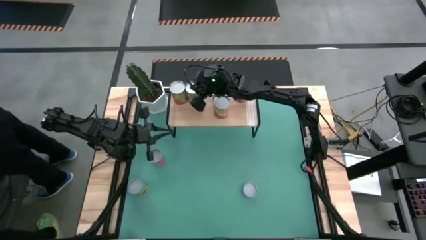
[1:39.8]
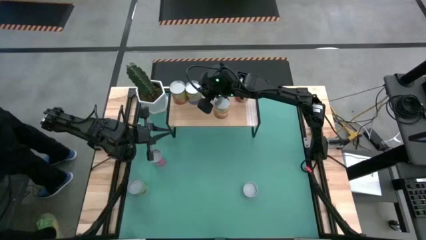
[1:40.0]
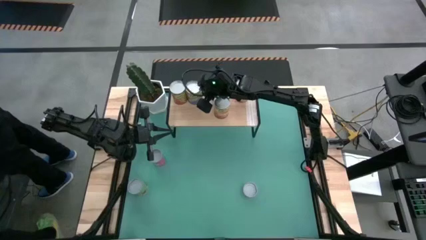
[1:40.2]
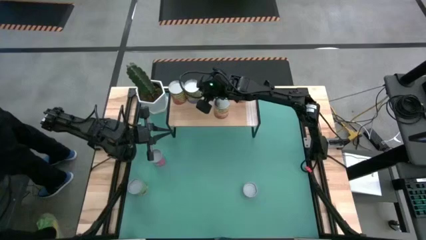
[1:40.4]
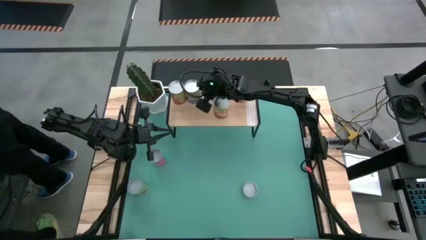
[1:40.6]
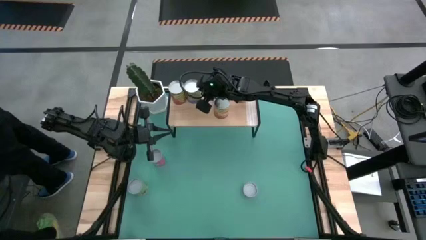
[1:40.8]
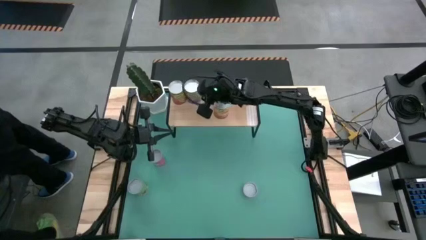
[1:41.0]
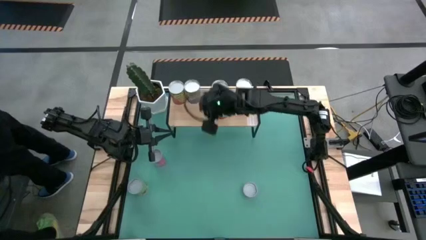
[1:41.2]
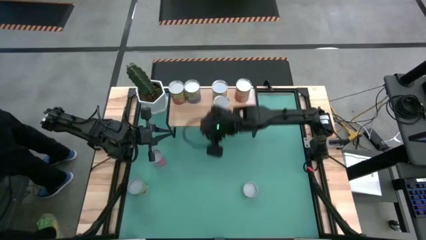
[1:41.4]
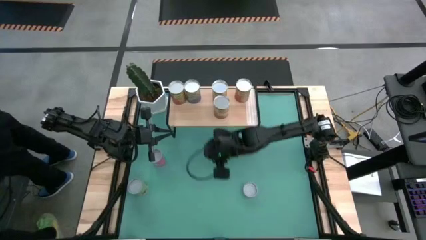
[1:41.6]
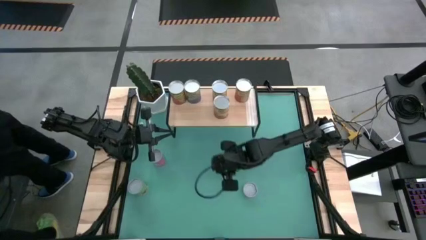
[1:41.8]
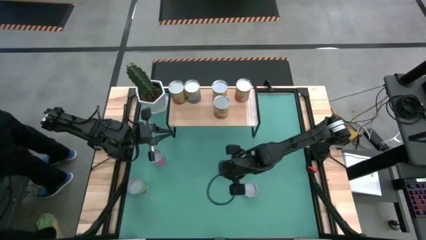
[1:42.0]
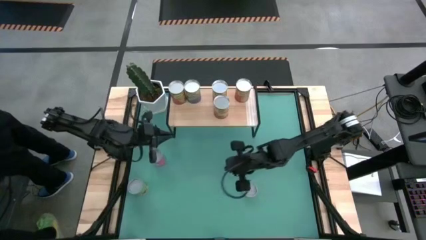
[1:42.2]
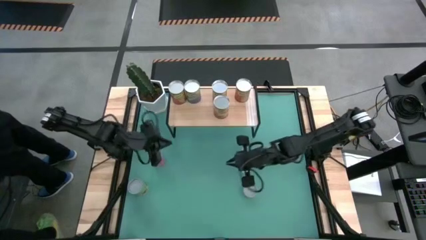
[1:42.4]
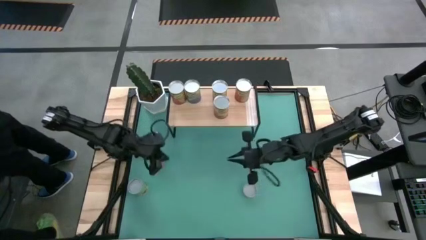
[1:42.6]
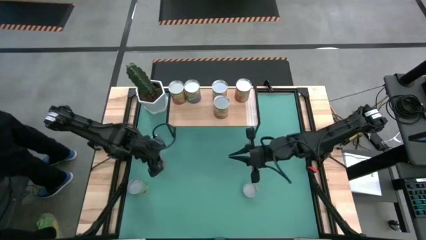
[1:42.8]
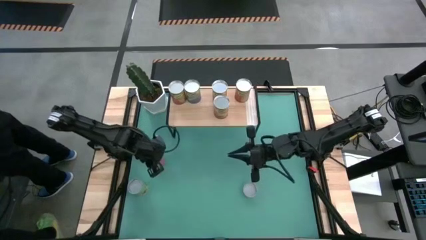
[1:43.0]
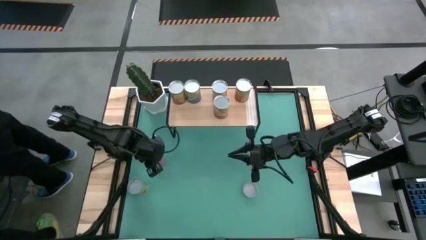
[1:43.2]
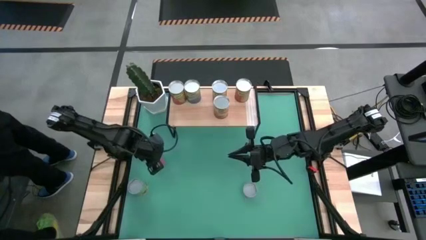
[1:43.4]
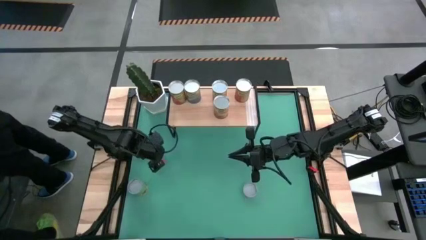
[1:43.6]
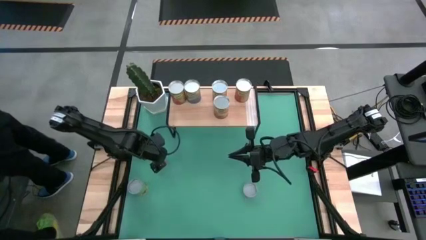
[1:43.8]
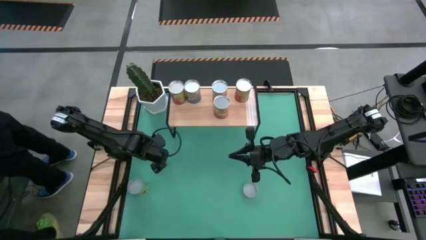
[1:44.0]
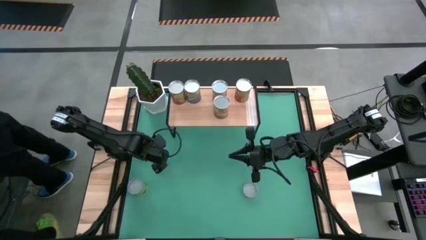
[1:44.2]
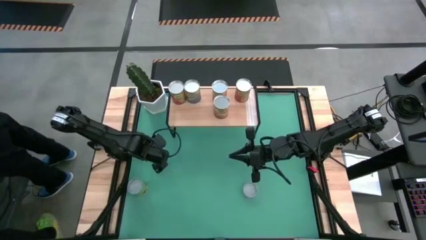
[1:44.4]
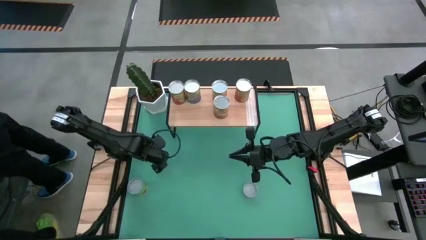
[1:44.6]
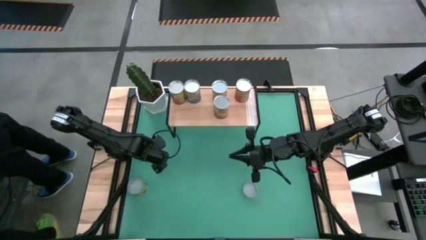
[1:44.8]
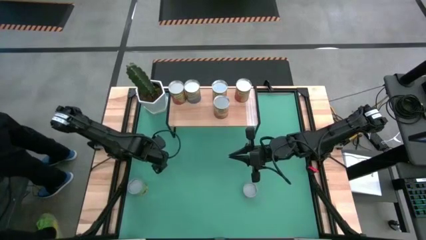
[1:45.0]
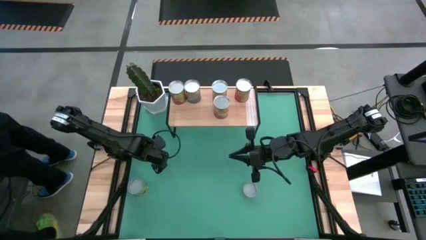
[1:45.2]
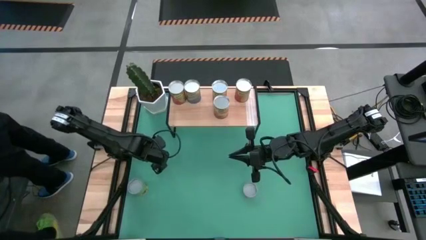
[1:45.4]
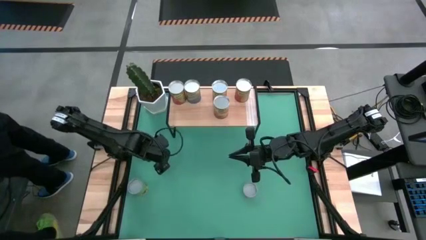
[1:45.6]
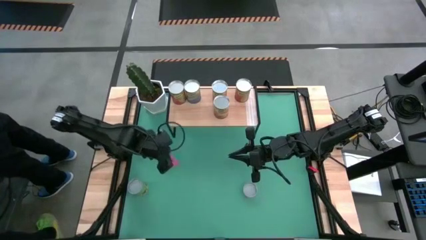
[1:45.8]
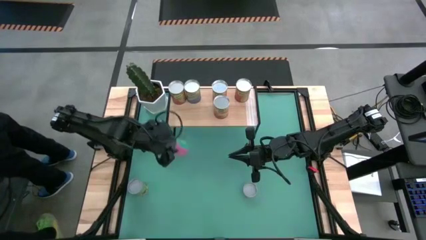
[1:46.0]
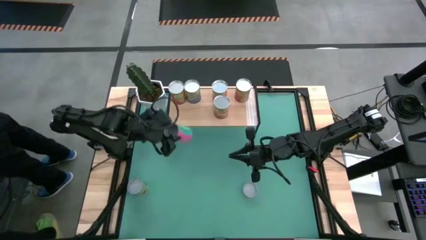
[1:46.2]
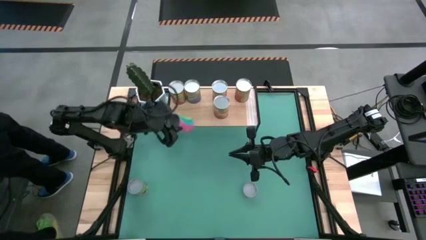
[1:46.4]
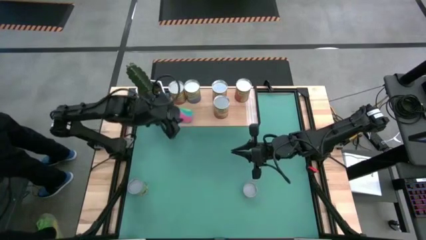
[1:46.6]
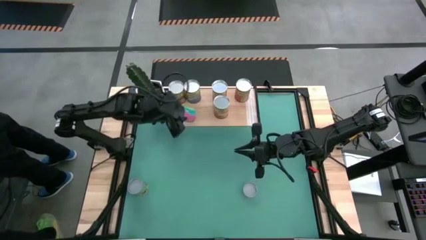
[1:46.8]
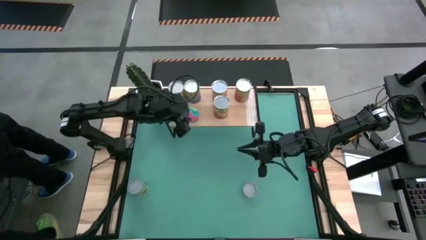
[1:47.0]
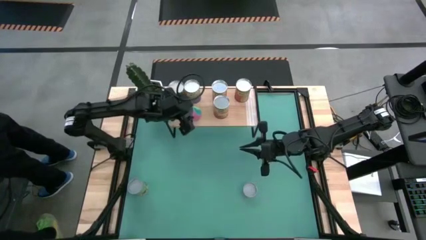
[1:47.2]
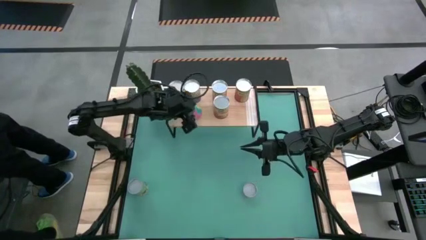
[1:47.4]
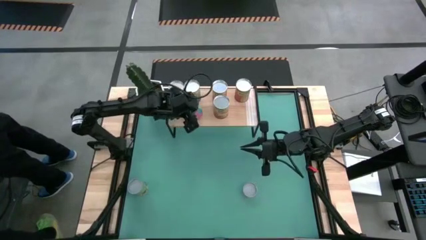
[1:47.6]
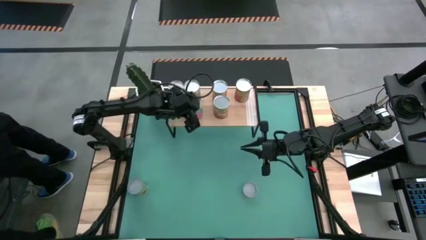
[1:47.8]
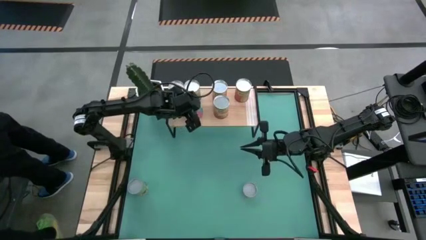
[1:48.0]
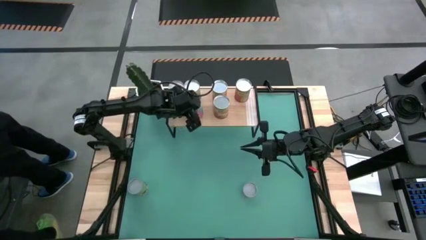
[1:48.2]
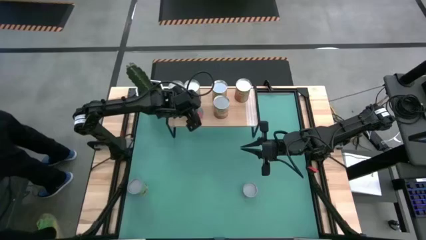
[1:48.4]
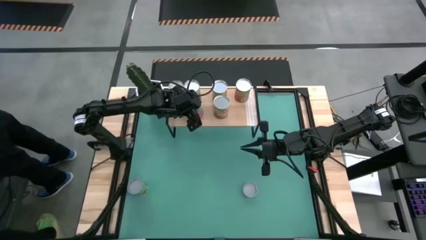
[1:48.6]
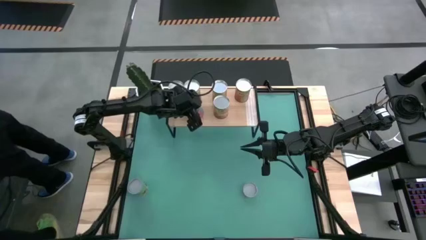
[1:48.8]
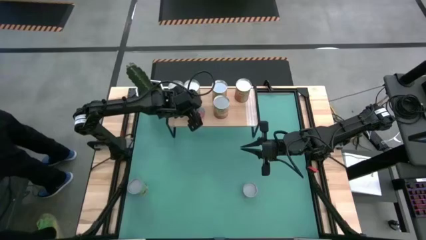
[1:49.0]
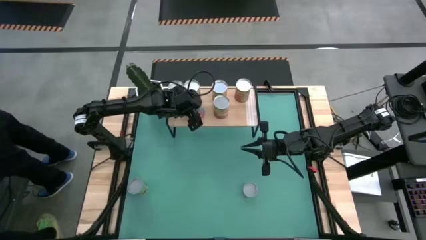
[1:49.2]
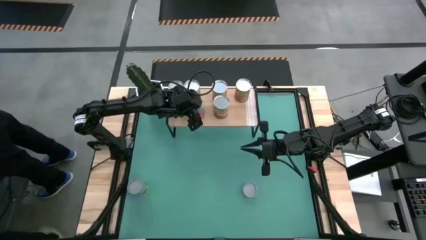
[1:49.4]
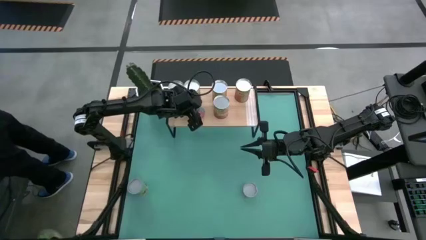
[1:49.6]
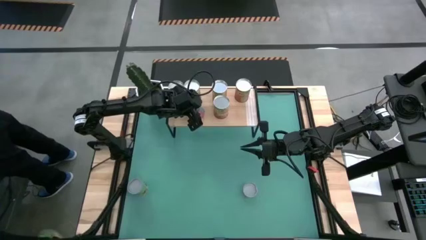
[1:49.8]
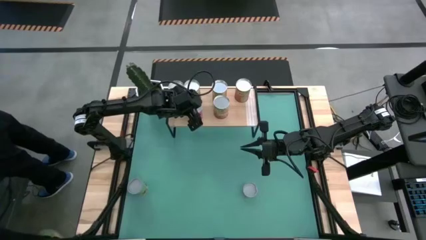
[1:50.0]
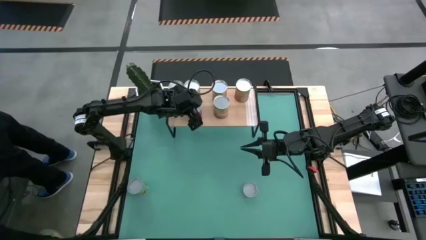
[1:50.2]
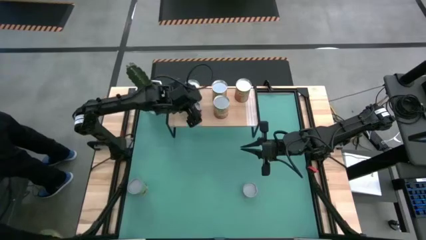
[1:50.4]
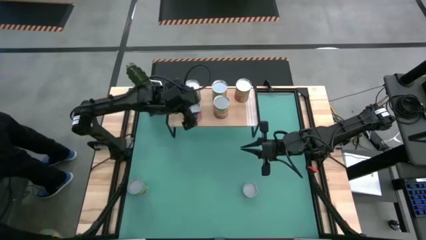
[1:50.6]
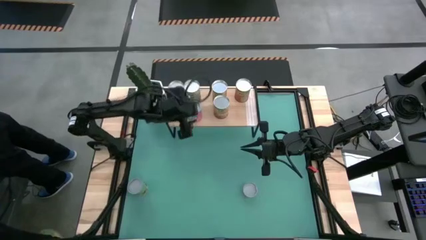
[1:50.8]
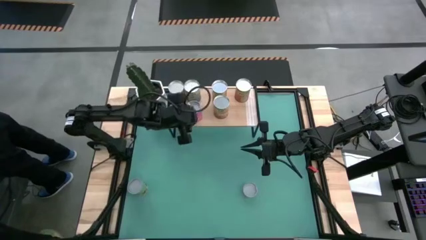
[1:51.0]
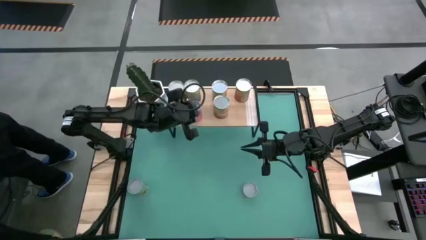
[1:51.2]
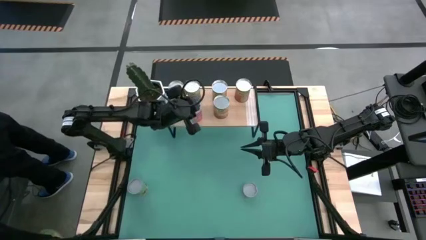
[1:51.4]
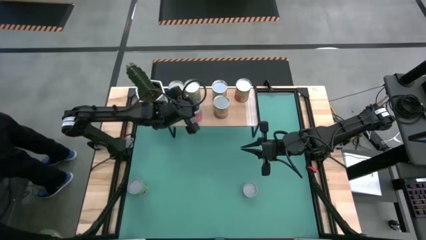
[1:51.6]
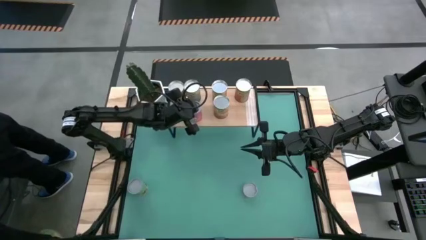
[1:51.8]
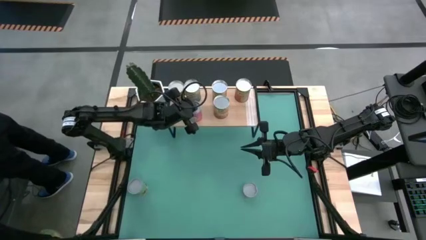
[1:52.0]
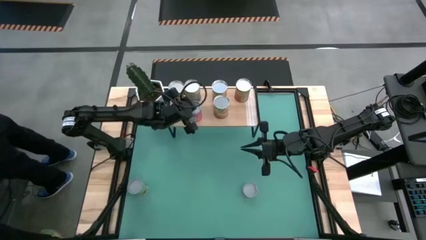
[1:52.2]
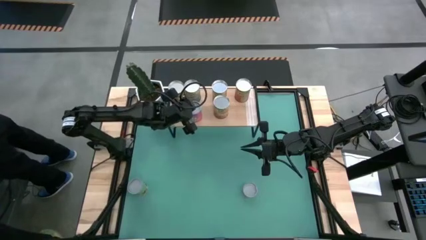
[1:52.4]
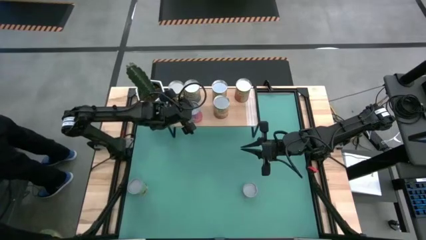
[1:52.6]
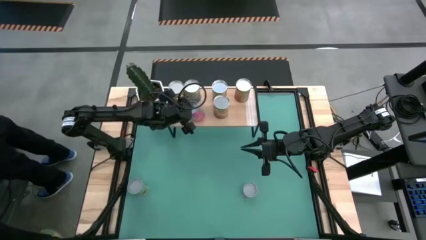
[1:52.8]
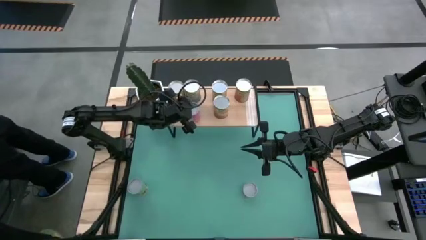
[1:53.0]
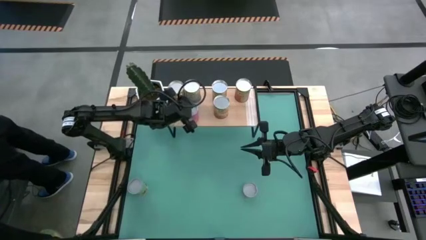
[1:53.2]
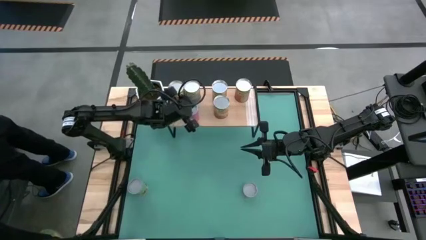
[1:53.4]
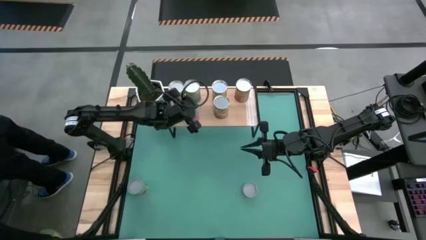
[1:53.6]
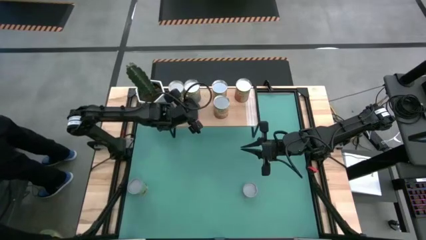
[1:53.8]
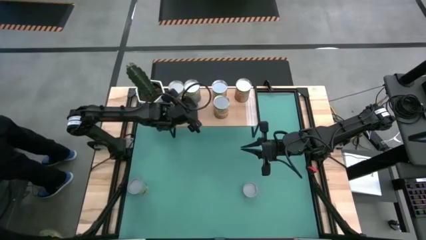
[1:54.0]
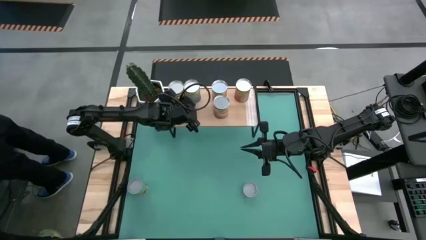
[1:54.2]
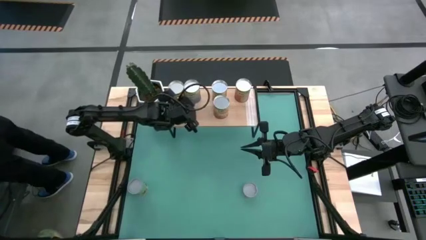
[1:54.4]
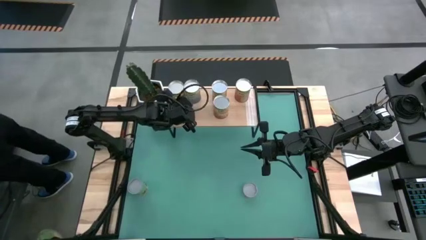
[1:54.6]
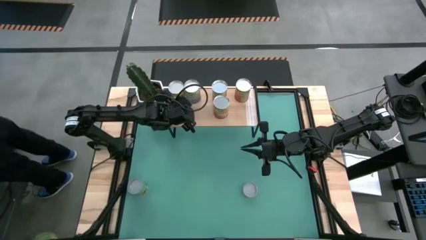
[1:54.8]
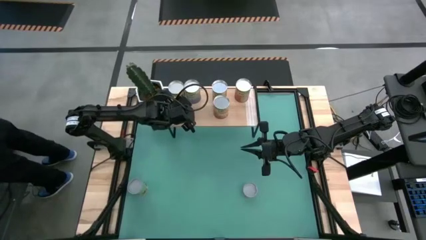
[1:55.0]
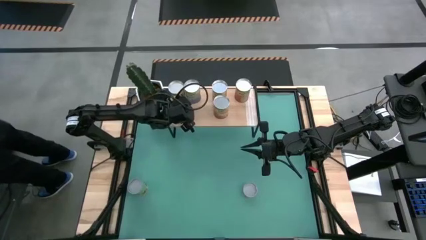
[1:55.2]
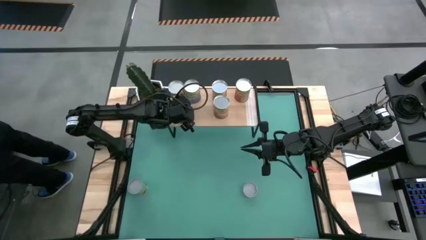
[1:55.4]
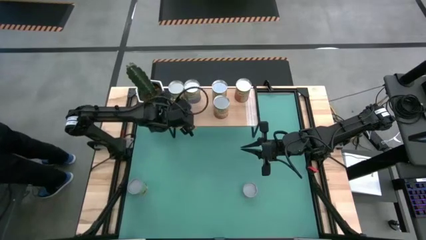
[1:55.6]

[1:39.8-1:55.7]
Task: Pick and place cans onto a shelf
Put the canned chicken soup on the shelf

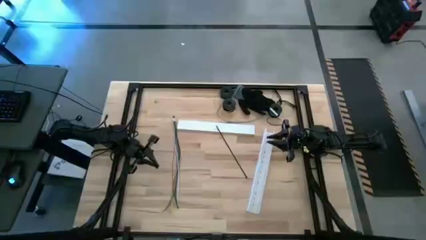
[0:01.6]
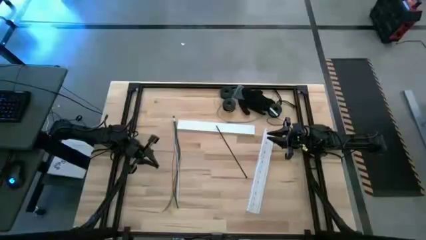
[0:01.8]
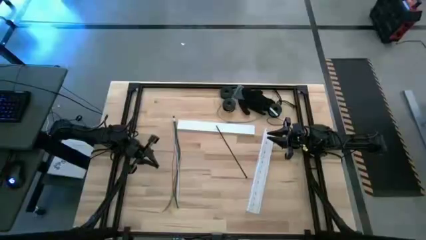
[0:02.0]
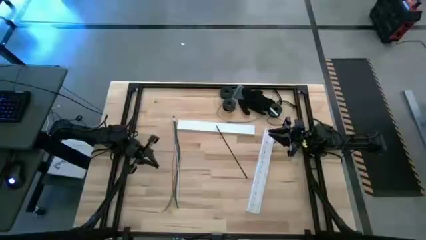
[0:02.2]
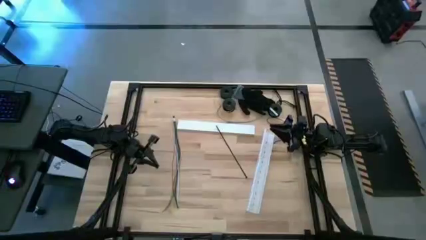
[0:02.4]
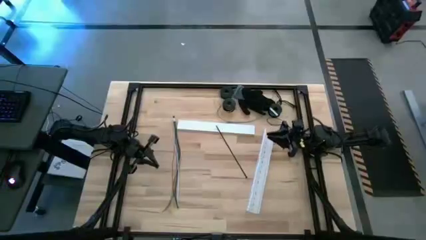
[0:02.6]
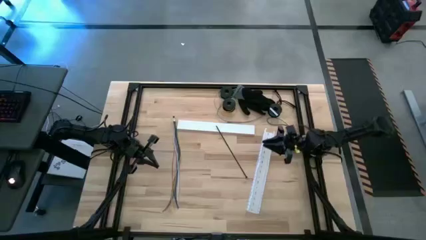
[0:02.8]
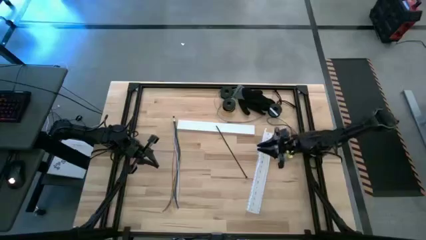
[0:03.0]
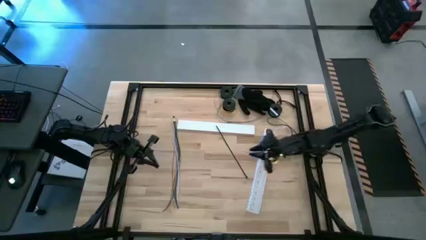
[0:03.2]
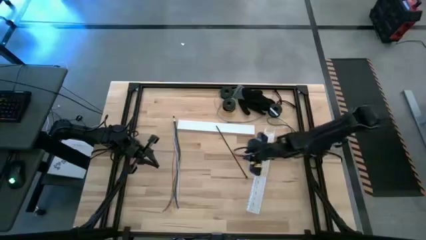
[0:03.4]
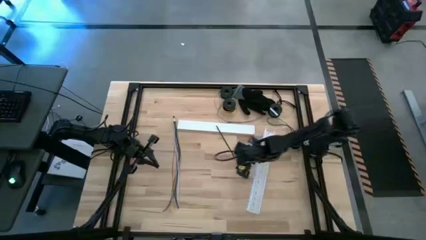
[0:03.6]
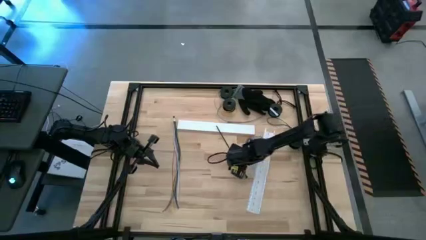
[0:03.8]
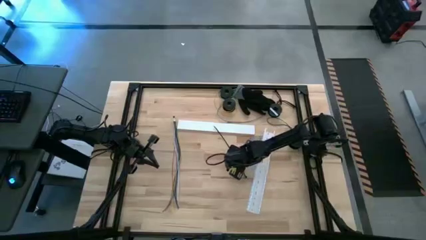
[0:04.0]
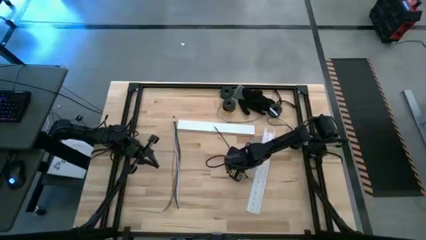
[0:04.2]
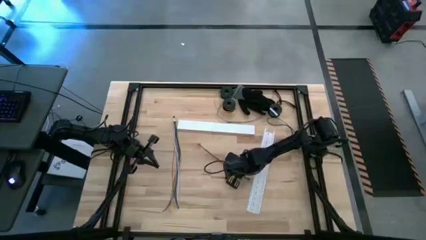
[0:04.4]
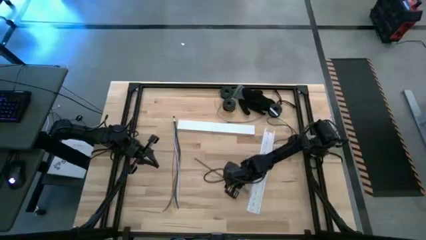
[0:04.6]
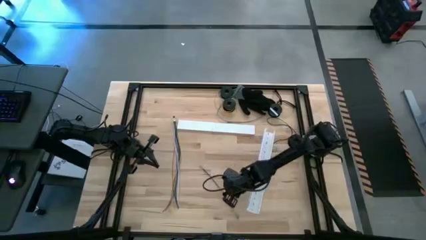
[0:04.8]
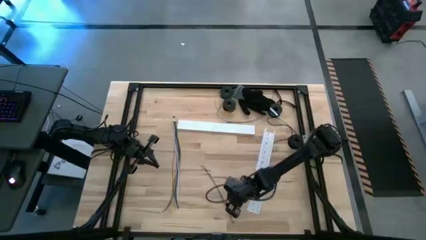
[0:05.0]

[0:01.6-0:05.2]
Task: Ziptie cables
Move the black zip tie to the bottom middle of the table
